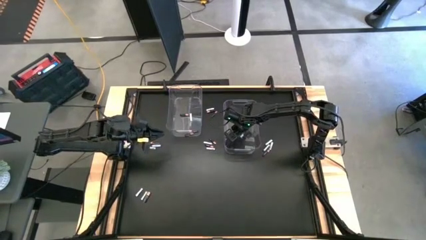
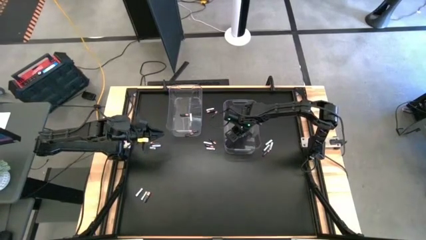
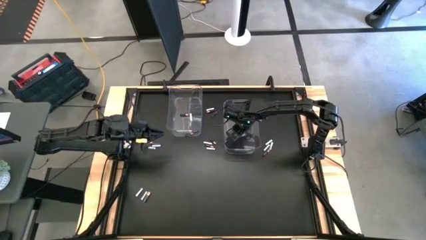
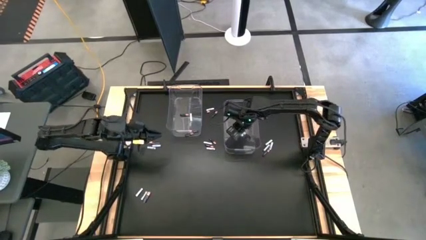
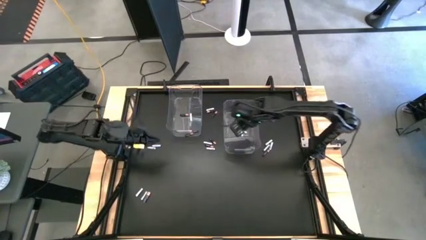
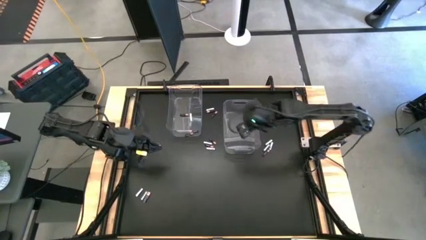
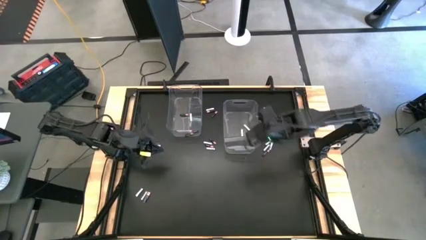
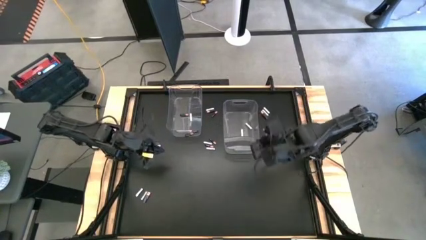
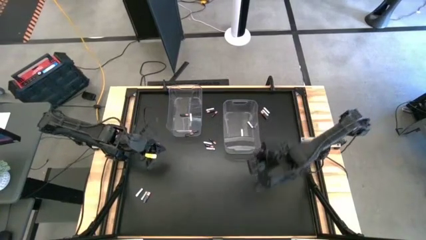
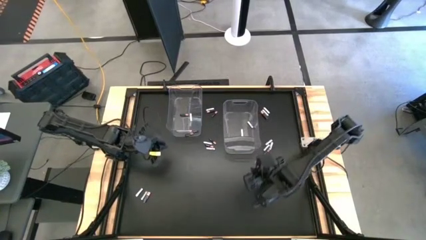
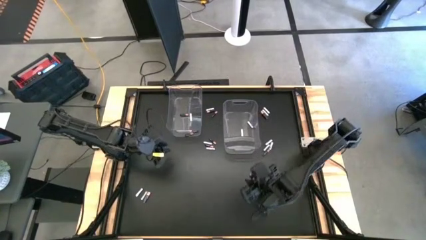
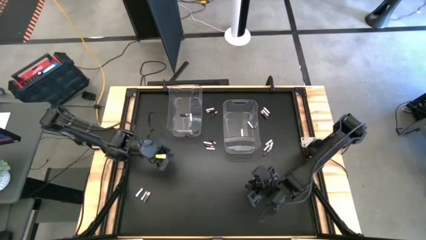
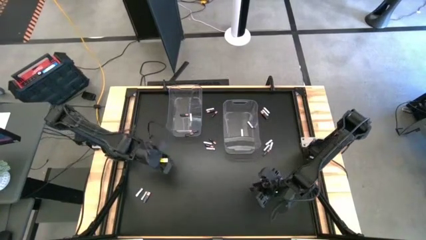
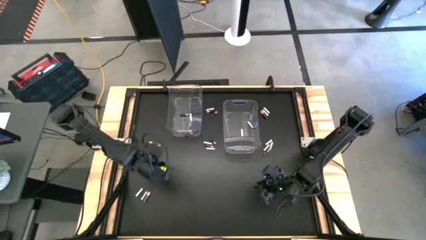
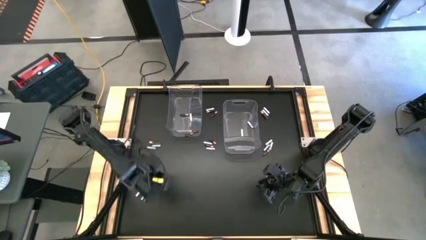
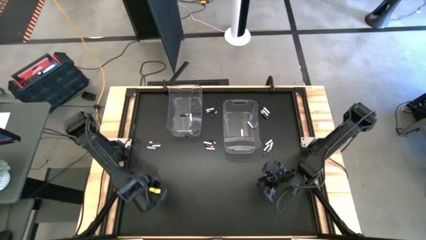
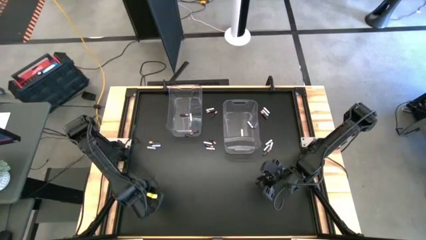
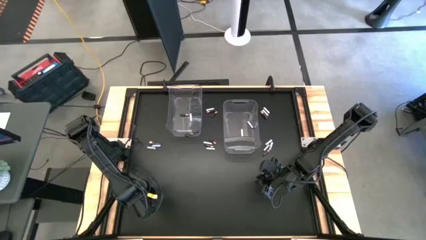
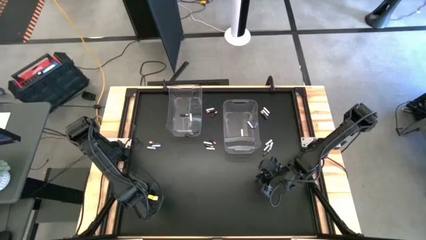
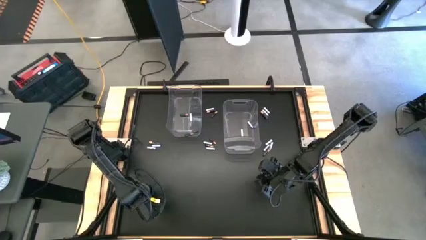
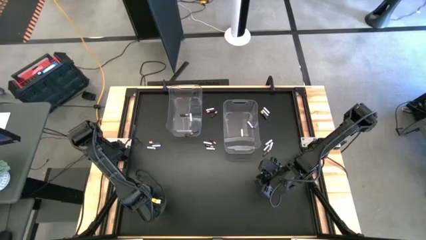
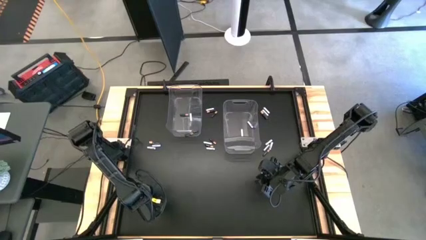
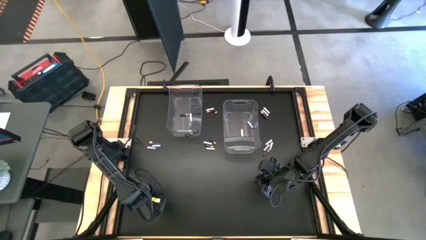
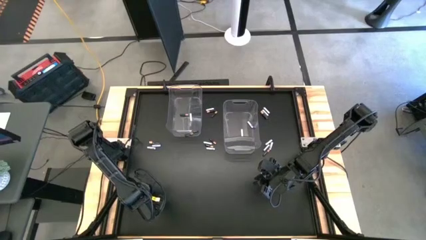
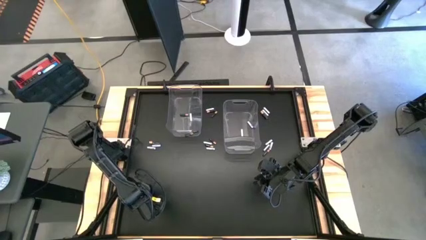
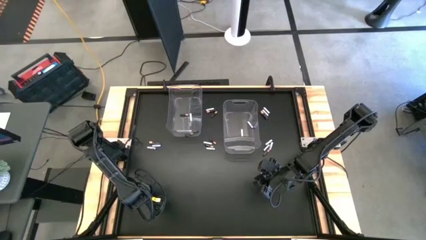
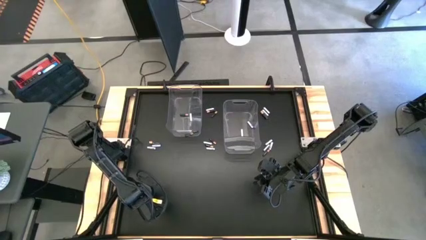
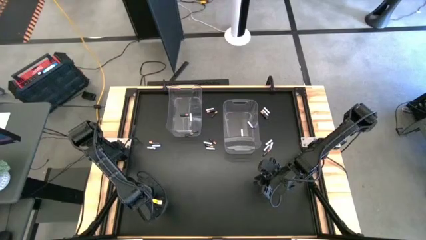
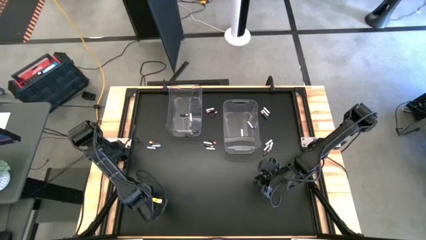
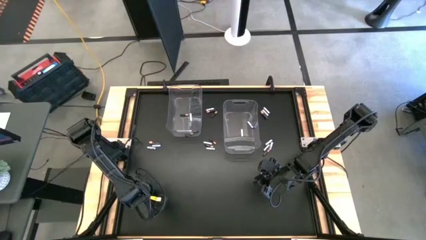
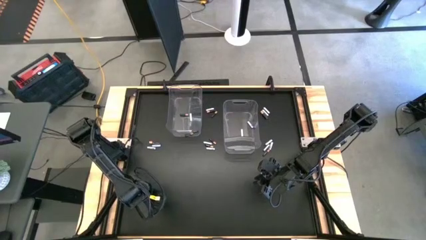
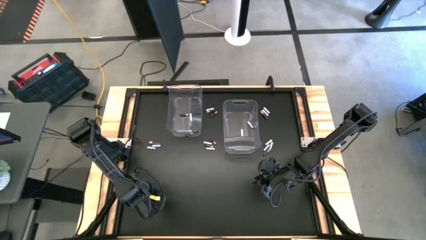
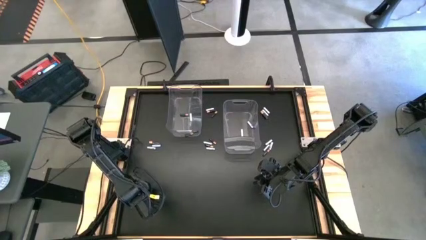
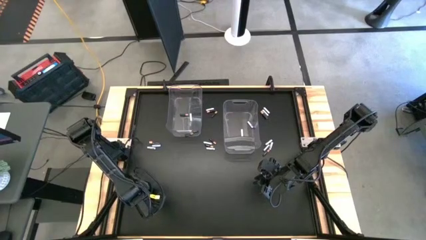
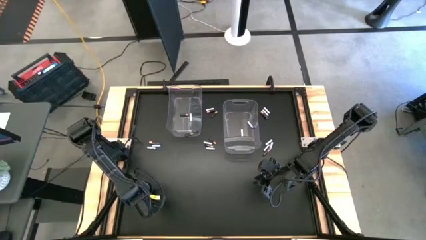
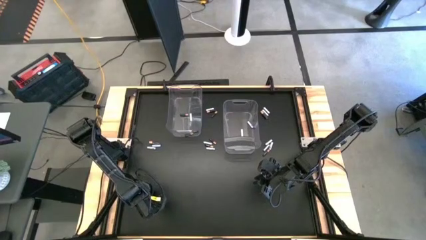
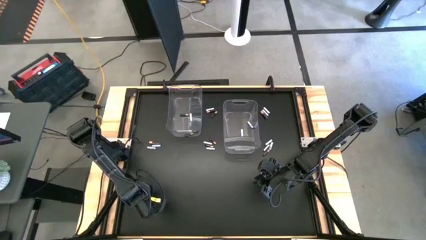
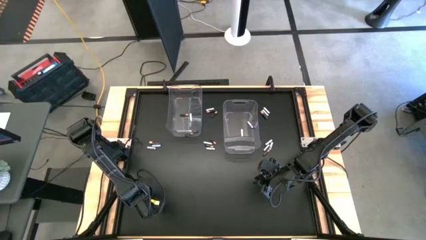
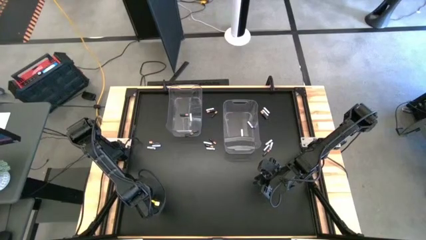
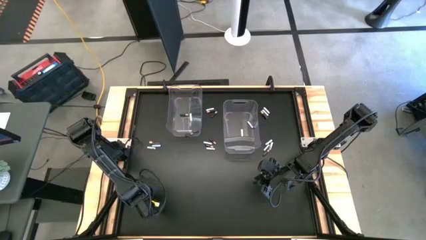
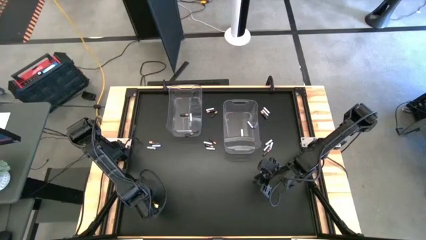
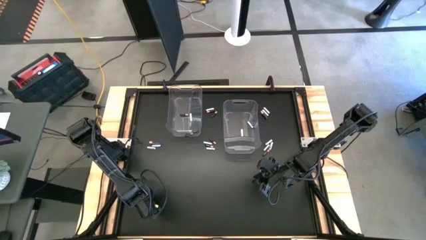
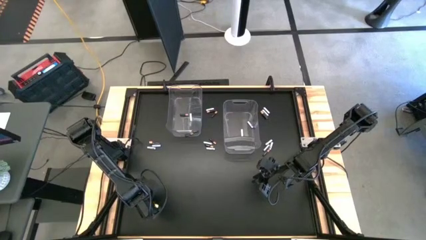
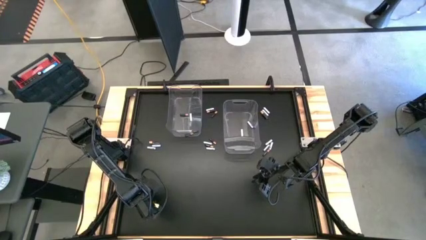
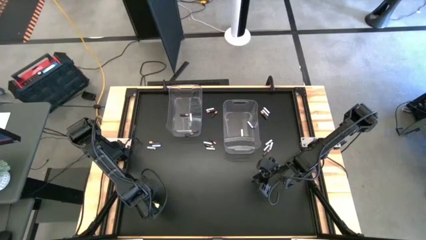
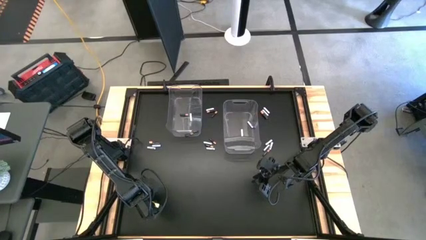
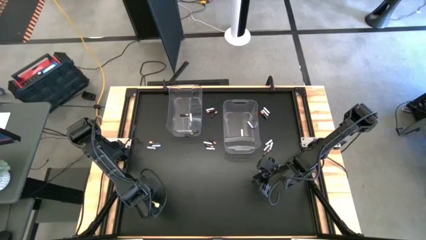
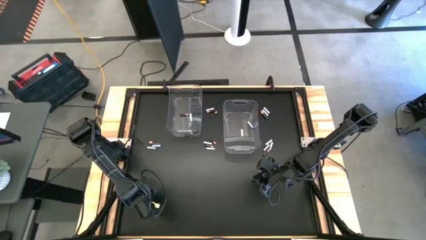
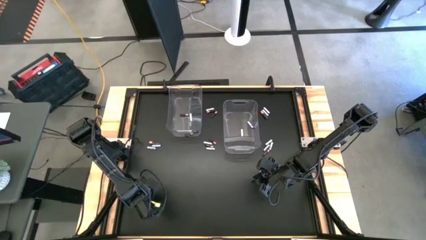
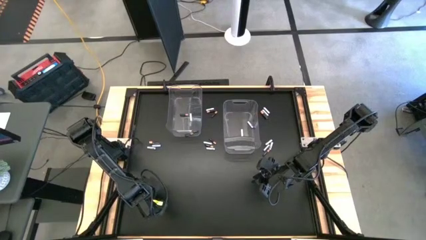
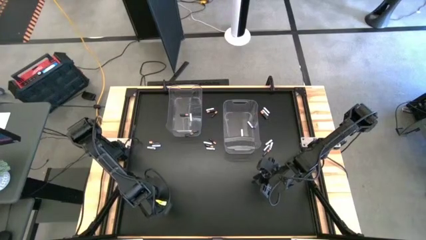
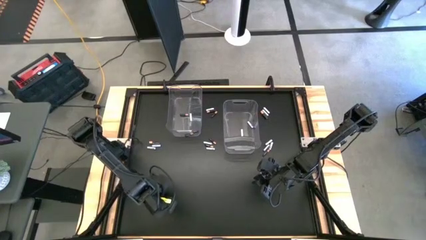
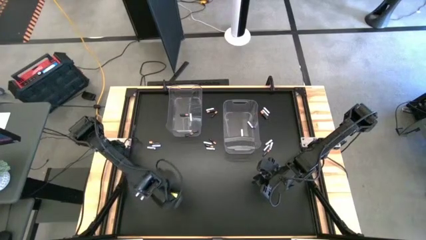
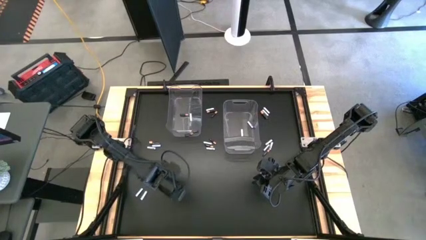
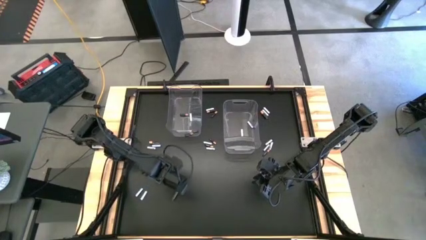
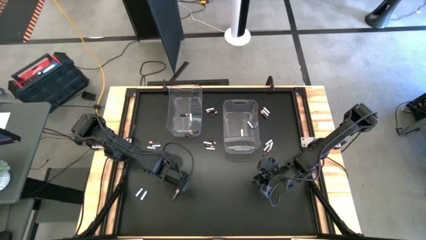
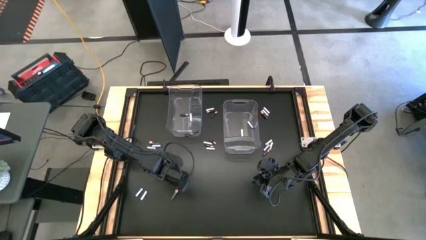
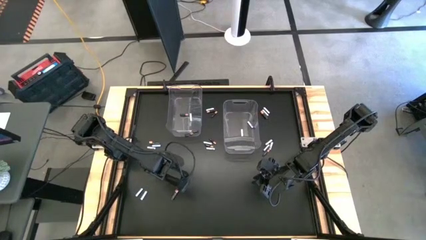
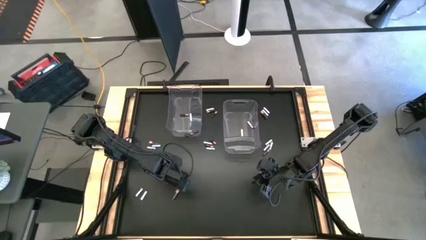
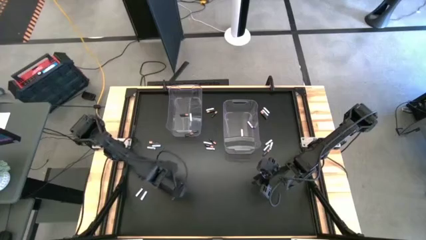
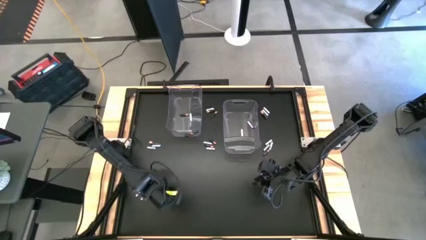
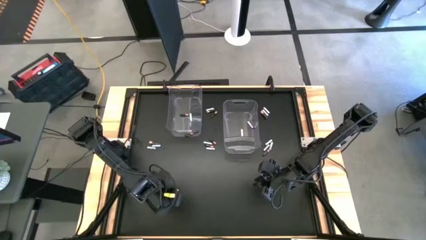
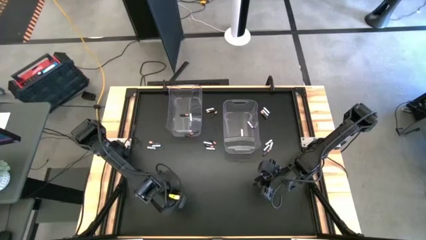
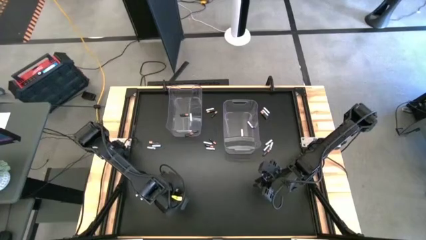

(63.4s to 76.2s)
Task: Sort batteries
Put the black battery into the left transparent bin
